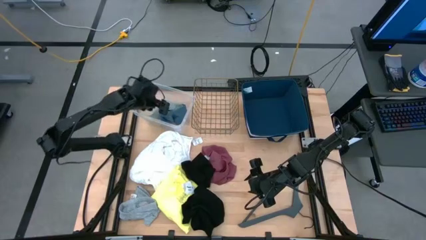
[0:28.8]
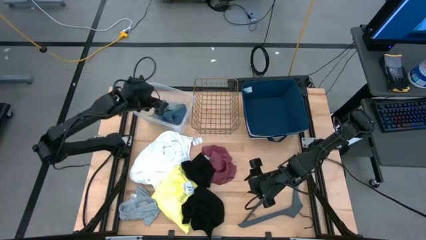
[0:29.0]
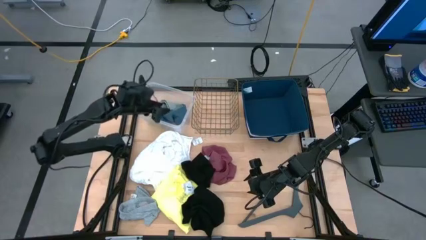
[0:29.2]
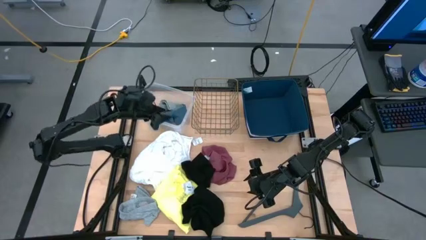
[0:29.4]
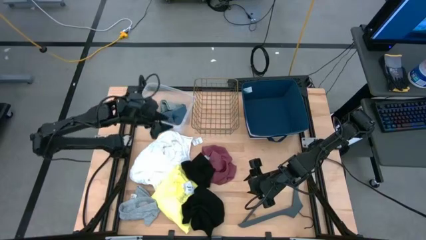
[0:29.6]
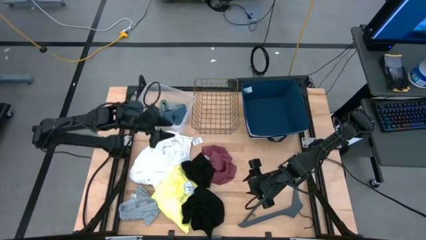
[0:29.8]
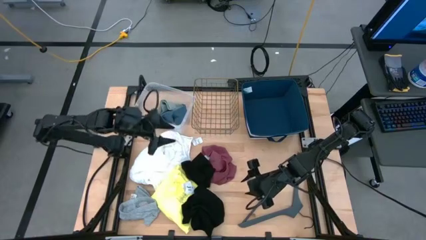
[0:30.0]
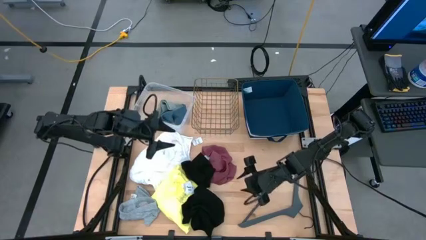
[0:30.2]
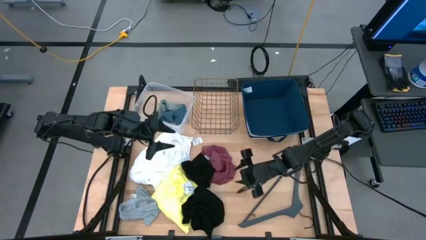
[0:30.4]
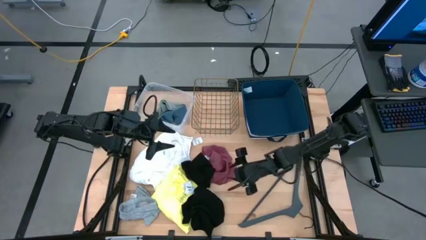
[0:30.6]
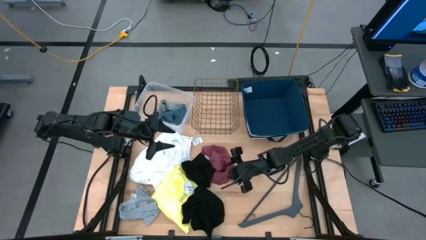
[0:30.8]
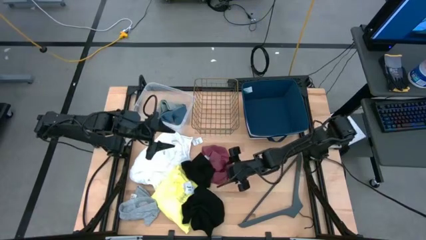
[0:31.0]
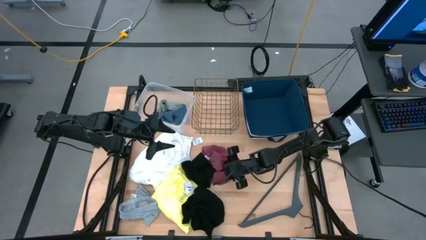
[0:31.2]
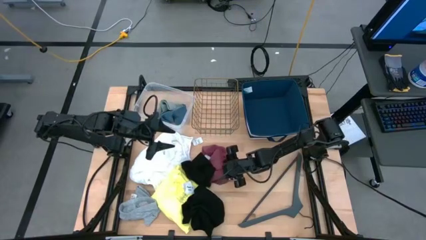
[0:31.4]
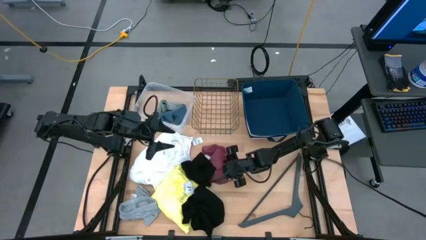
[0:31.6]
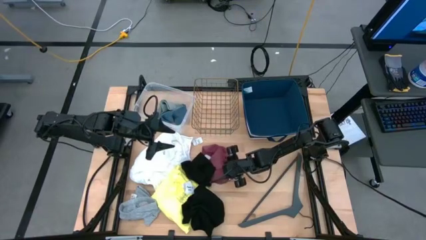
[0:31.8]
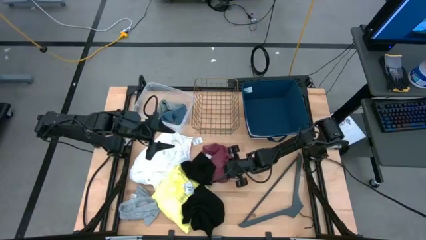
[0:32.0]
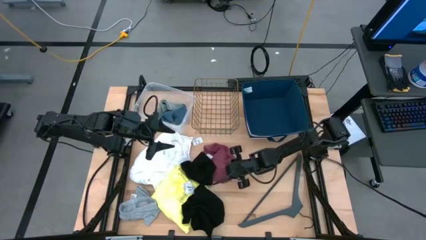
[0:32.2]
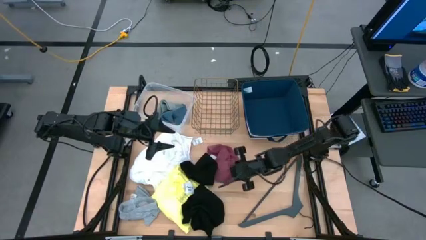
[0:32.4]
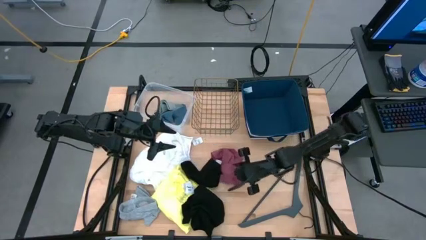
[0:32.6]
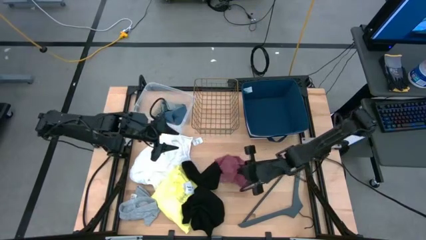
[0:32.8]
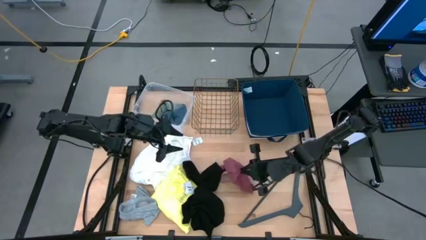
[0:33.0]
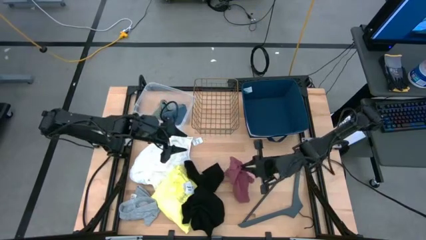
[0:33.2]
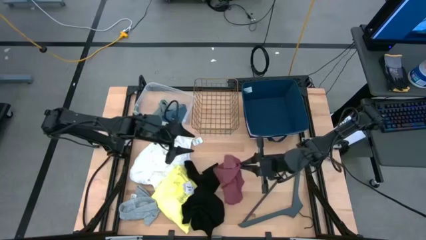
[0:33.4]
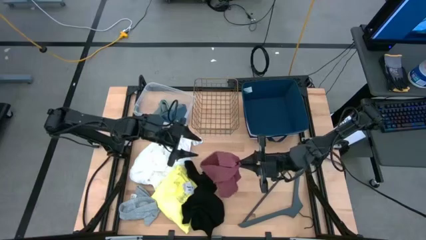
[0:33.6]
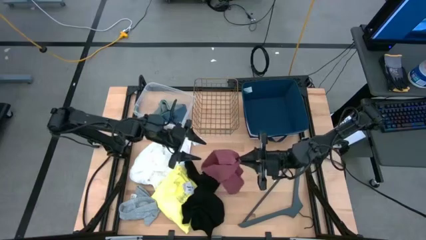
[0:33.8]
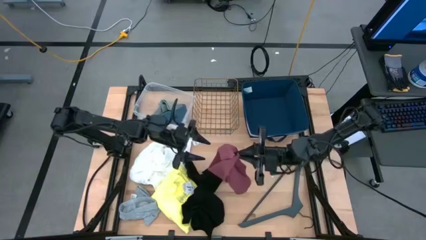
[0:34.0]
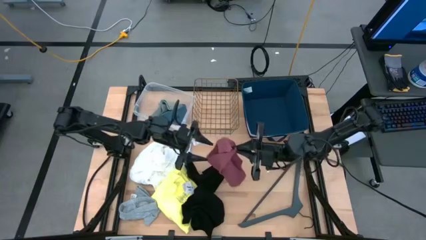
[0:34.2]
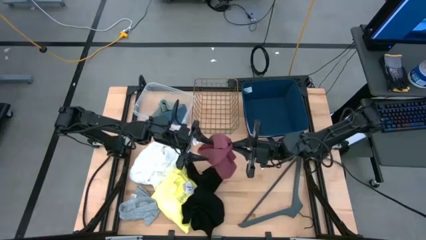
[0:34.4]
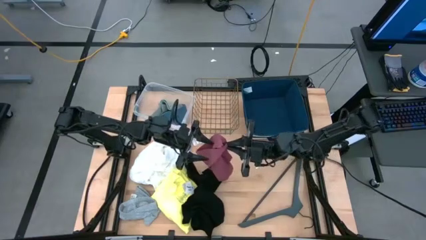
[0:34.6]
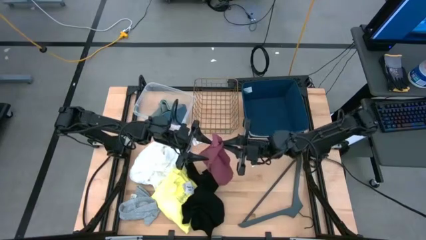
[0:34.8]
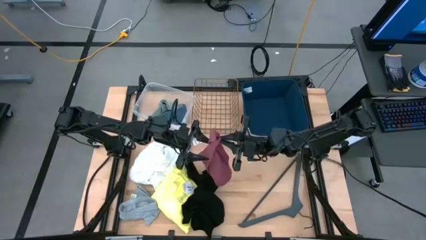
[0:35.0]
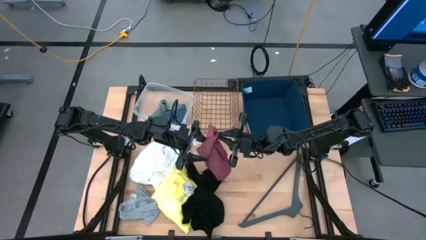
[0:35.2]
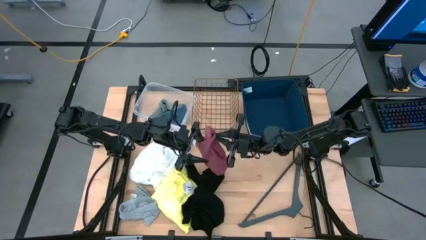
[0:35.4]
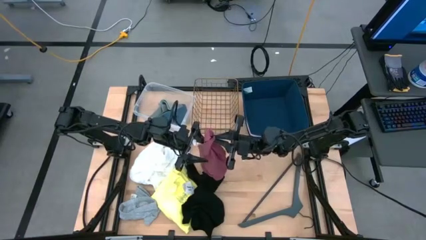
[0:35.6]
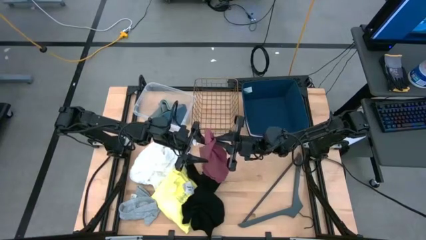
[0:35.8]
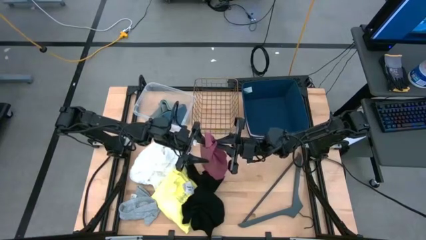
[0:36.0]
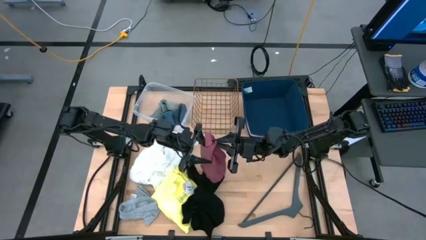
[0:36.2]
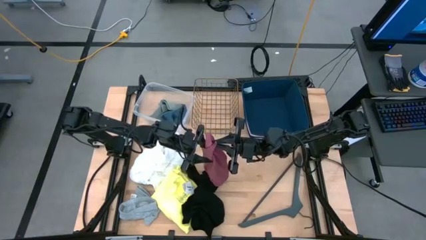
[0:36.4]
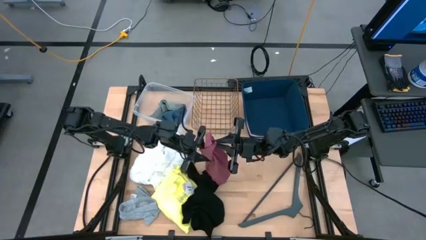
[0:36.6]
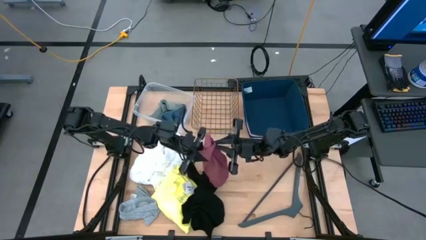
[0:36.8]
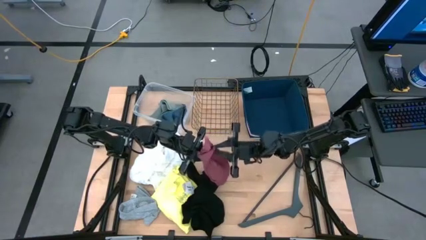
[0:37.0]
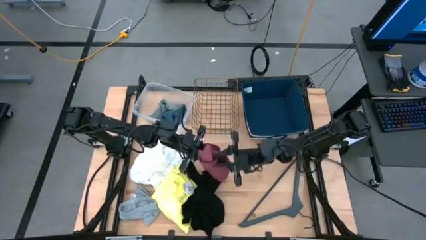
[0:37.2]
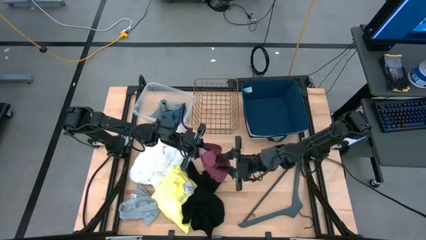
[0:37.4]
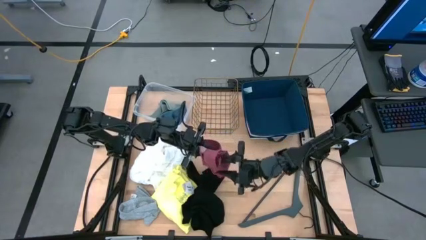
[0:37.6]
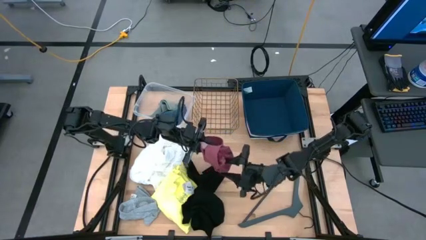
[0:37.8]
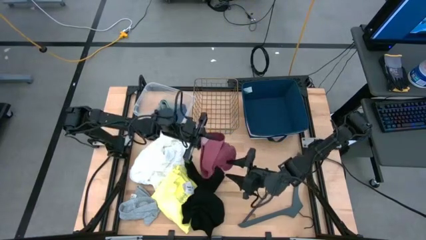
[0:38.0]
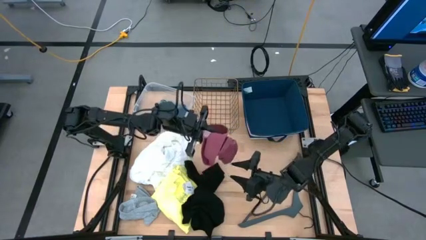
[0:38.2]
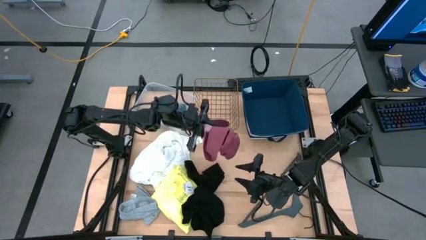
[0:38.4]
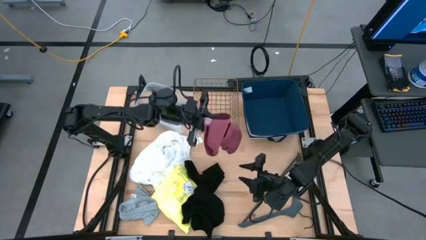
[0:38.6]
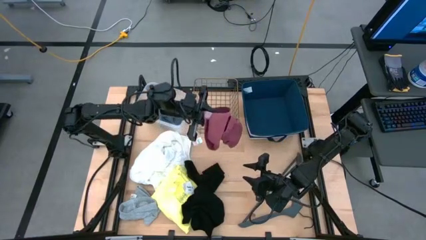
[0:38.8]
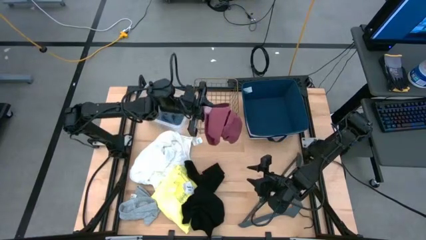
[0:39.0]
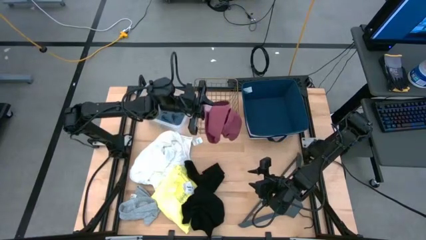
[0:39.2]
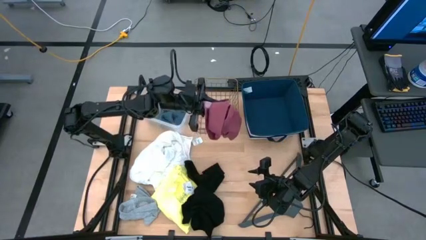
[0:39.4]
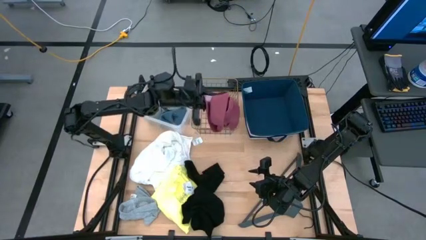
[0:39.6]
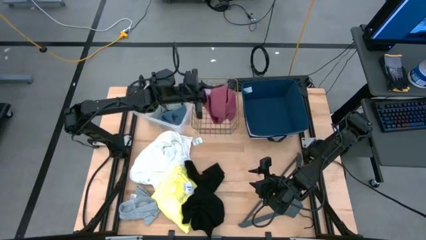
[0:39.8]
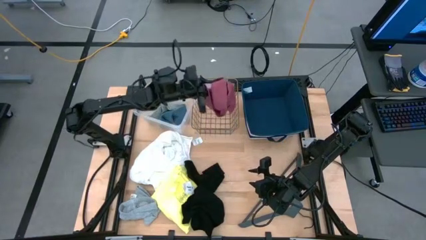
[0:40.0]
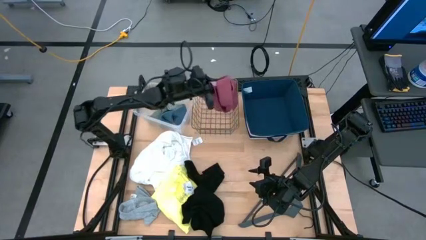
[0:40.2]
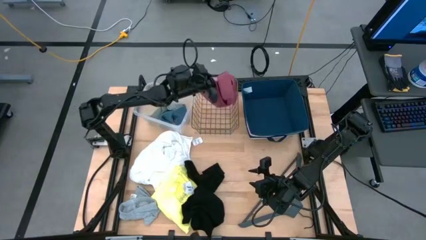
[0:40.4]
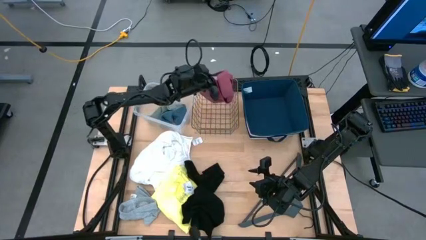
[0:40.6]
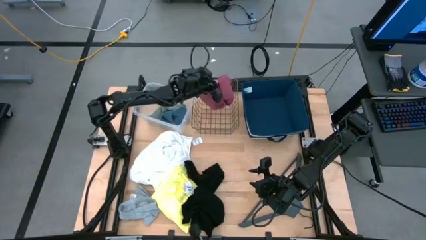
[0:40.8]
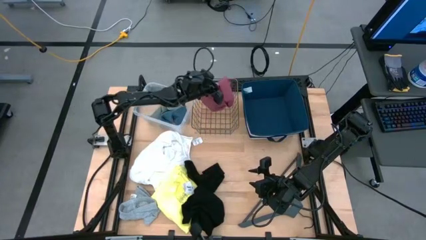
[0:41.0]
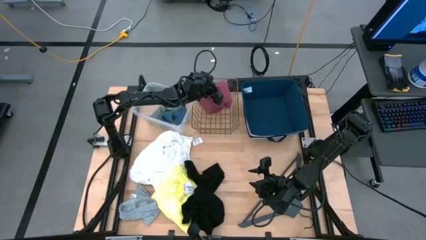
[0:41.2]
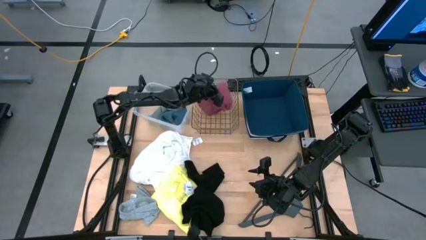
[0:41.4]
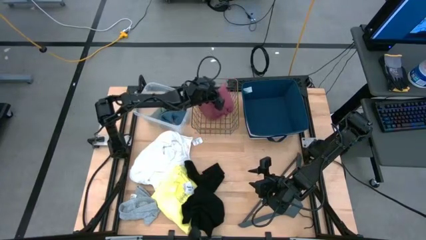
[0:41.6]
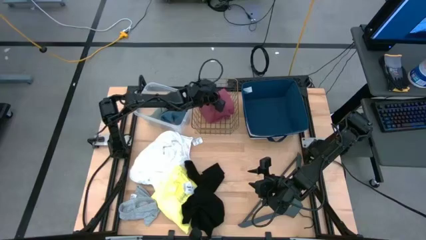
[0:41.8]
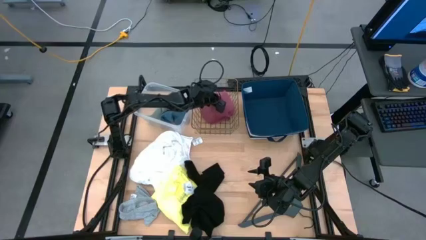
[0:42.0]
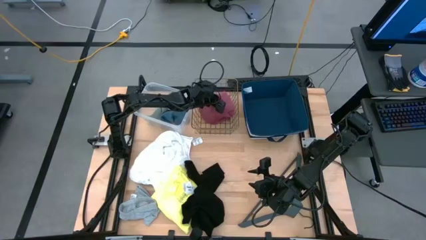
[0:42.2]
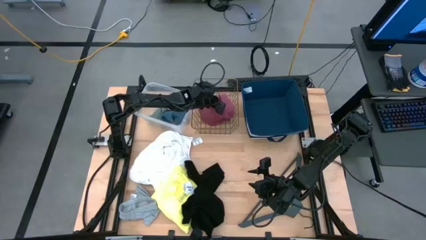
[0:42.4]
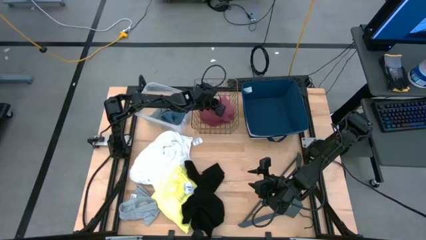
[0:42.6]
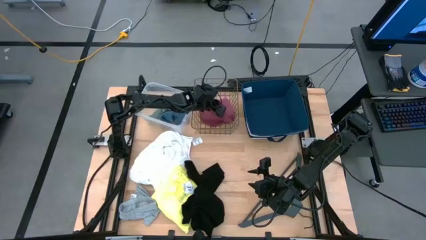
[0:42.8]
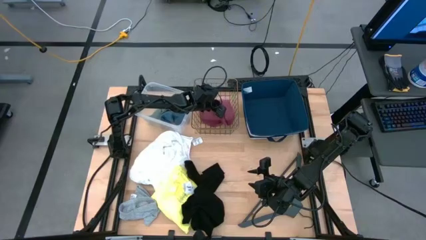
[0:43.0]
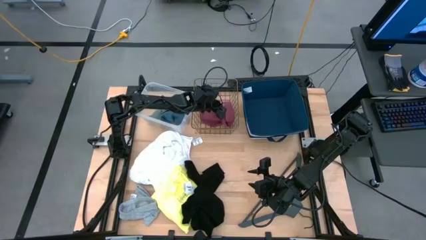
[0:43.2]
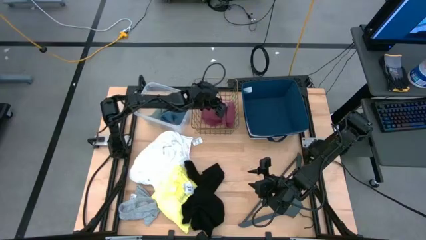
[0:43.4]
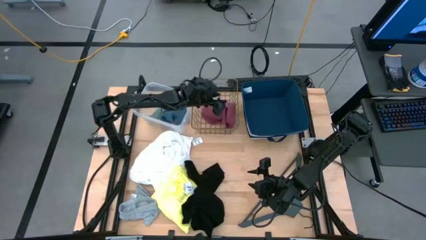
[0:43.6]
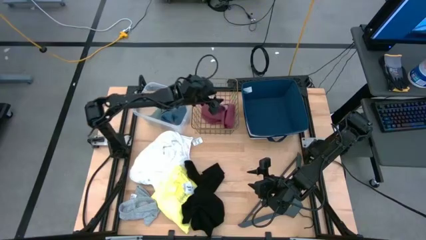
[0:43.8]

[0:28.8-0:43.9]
Task: Pick & Place Cloths
Put the pink underwear into the mesh basket
